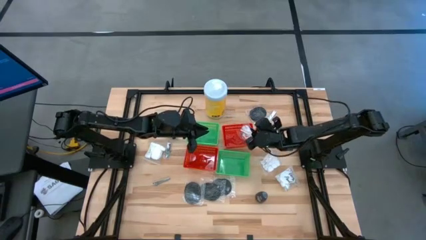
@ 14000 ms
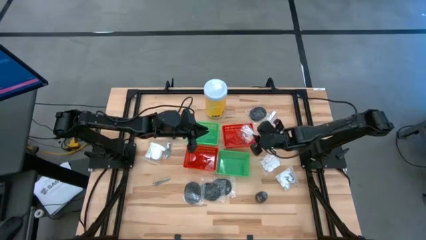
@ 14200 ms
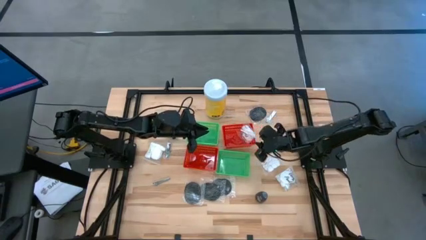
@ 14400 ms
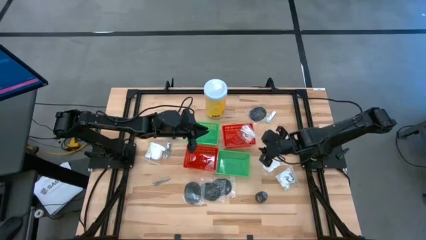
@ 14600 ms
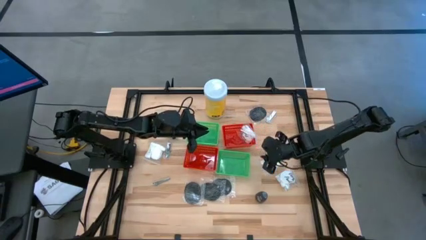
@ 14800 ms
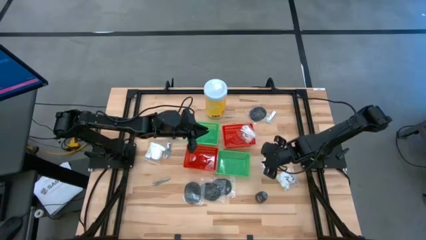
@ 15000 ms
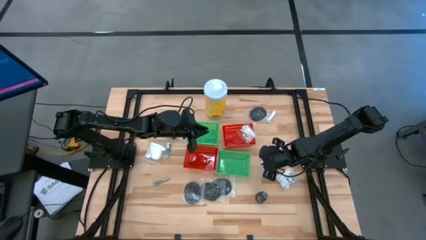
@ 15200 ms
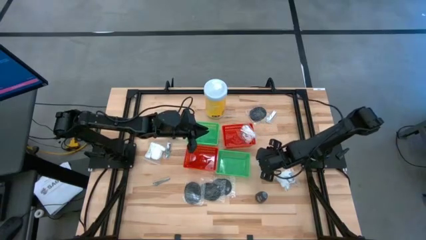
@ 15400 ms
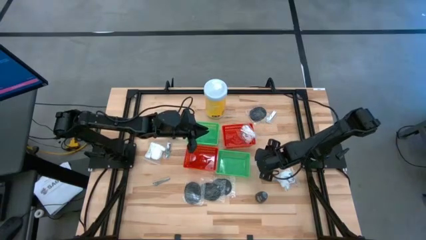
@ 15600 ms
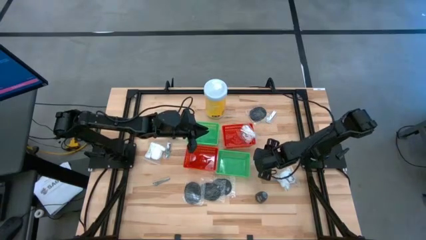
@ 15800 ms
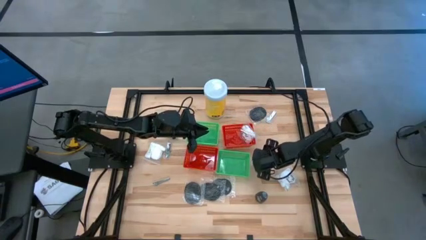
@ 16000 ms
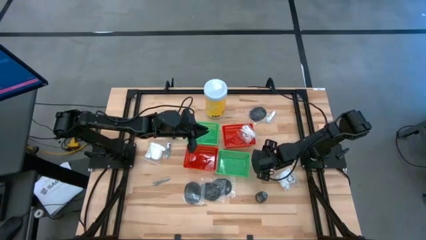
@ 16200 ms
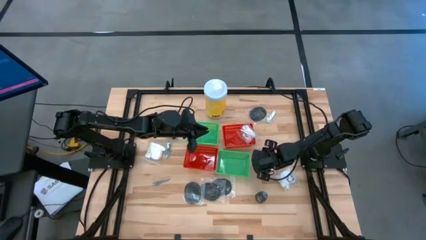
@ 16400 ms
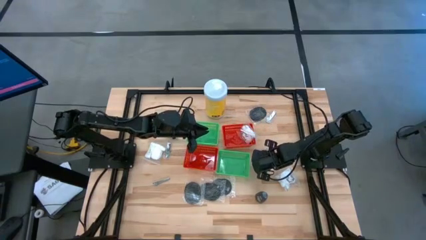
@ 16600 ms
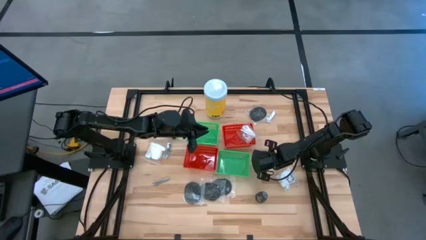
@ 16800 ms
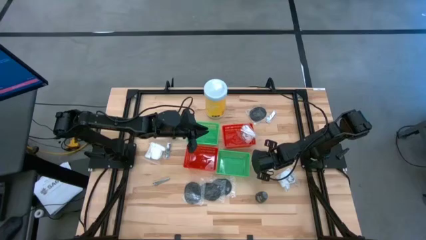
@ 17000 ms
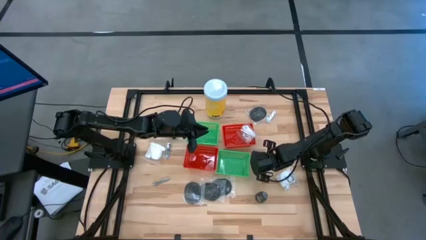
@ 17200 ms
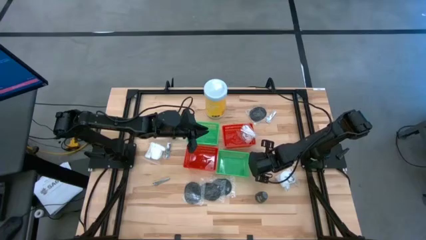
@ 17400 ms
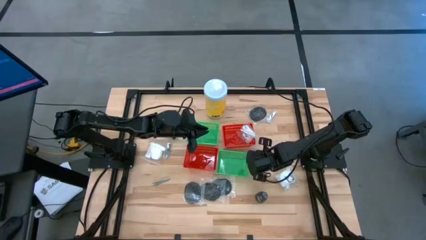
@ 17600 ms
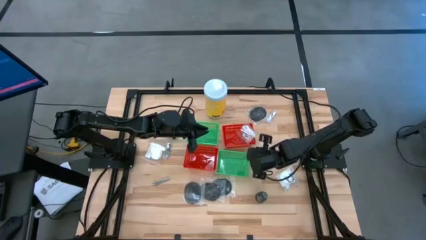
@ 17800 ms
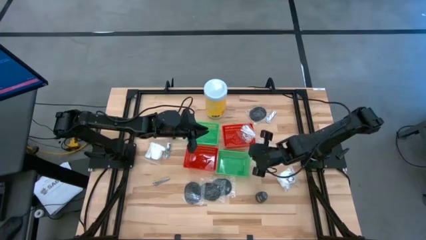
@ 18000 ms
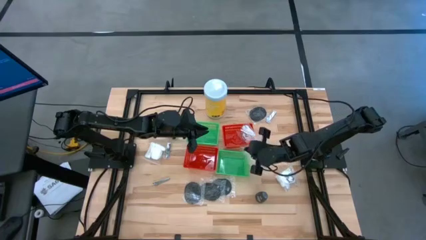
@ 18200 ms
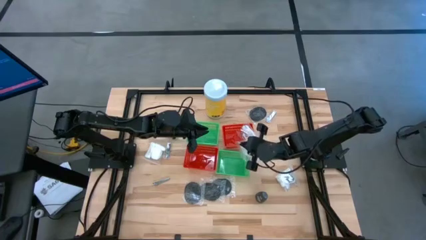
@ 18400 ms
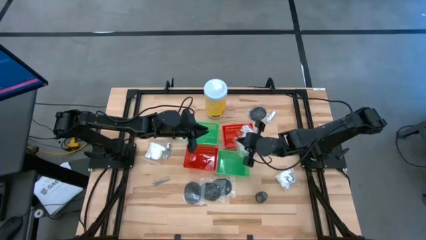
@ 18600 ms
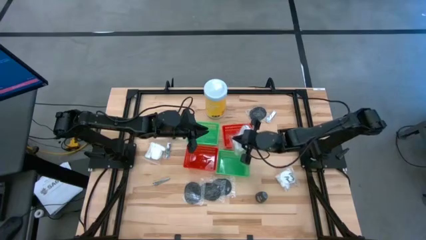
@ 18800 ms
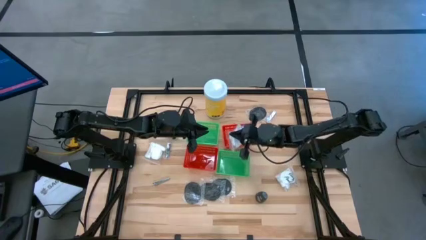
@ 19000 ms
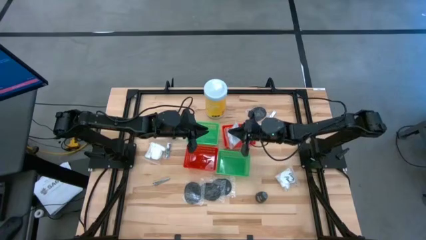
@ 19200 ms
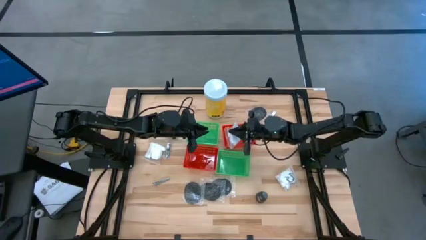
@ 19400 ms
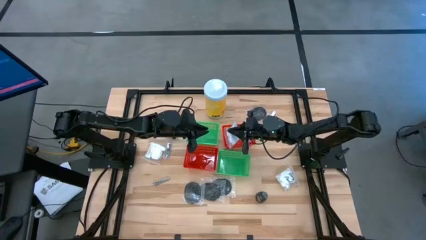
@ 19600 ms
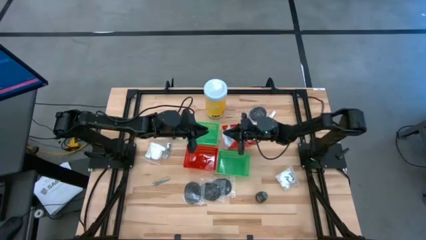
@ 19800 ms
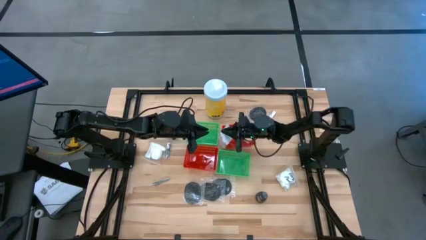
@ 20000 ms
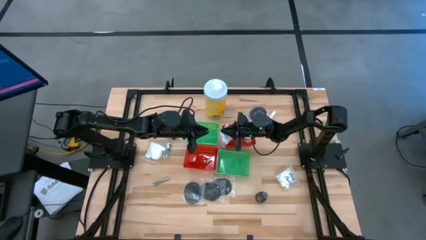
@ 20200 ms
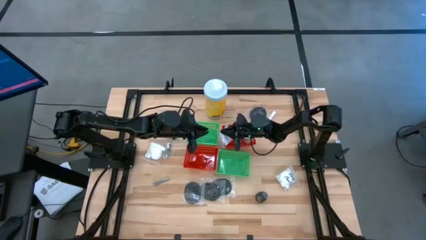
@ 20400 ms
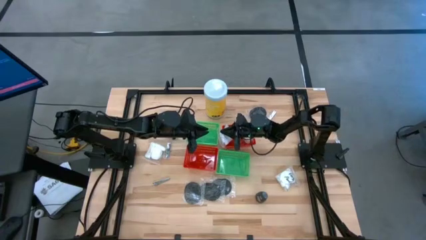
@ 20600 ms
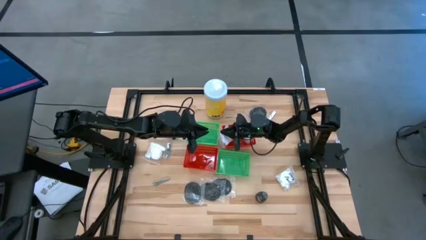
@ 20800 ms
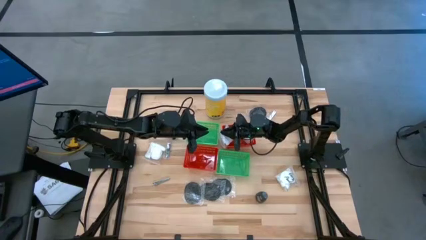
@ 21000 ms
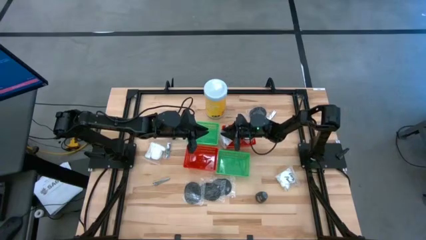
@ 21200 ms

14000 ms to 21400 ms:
Task: Pick & Place Travel size toiletries
Put the cotton pack into the right red bin

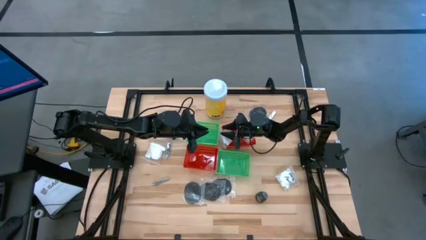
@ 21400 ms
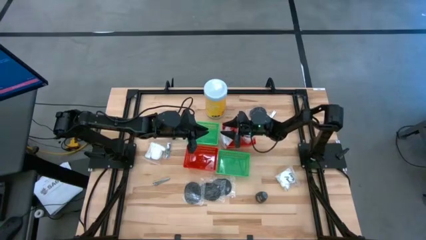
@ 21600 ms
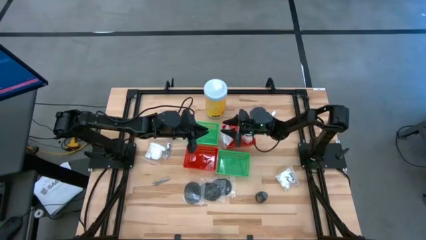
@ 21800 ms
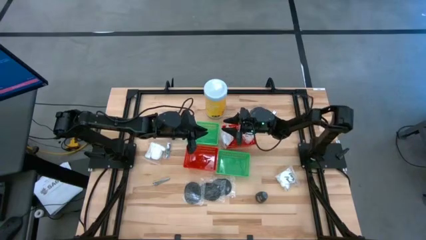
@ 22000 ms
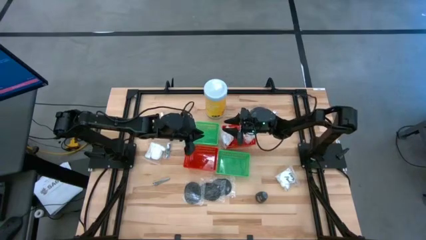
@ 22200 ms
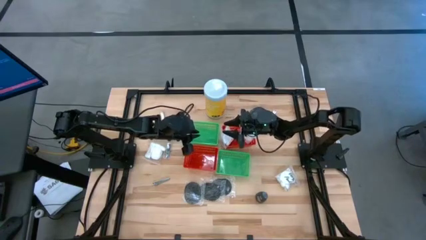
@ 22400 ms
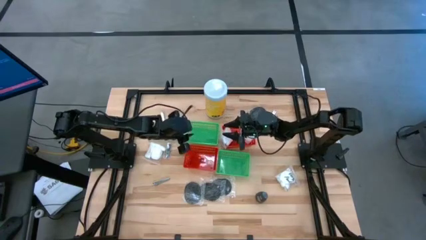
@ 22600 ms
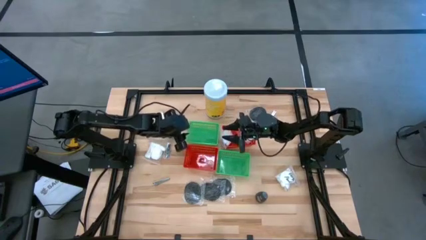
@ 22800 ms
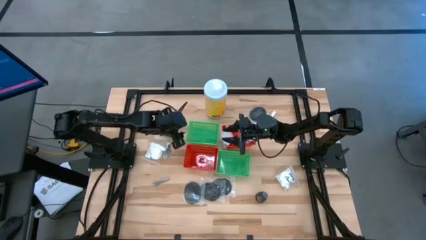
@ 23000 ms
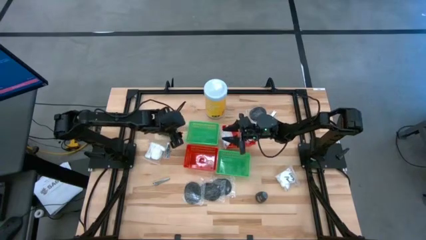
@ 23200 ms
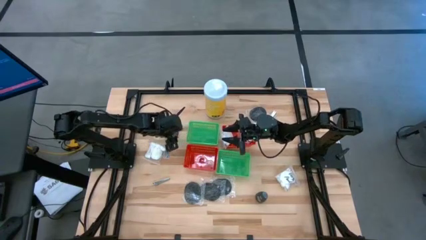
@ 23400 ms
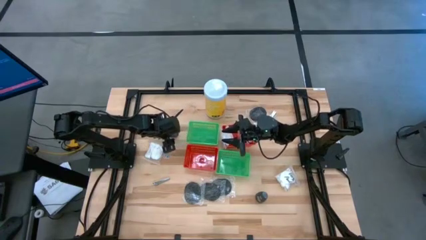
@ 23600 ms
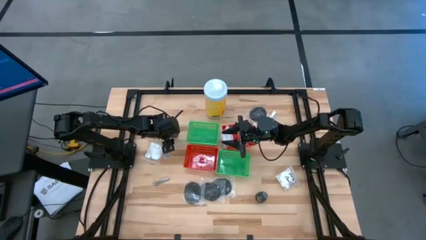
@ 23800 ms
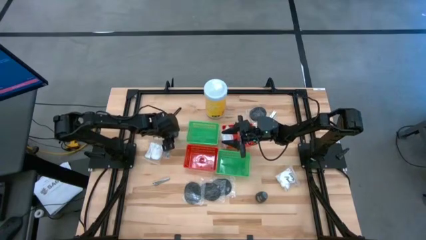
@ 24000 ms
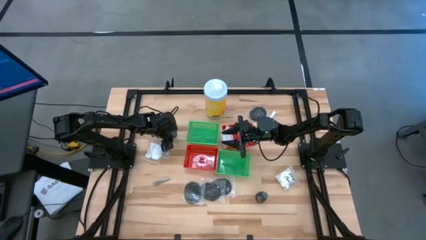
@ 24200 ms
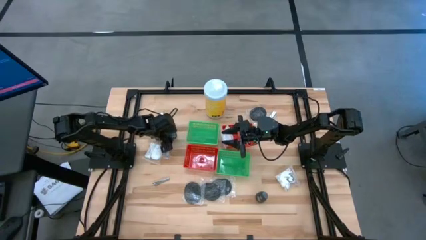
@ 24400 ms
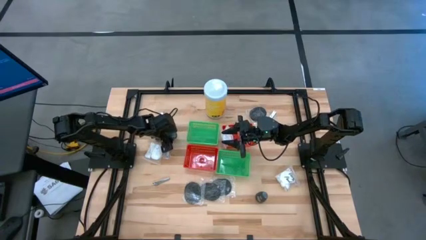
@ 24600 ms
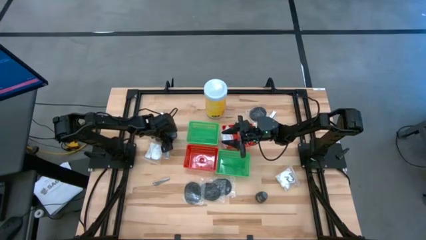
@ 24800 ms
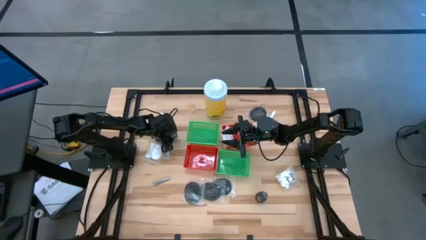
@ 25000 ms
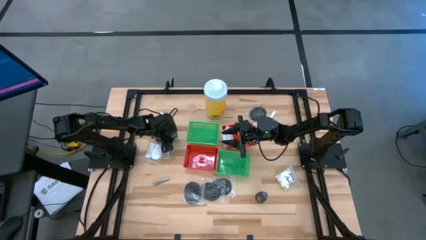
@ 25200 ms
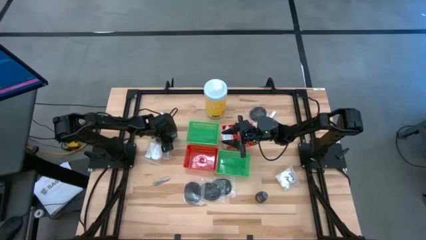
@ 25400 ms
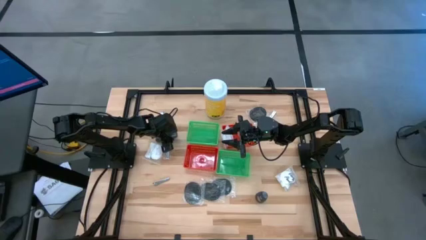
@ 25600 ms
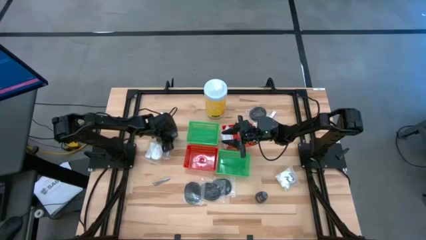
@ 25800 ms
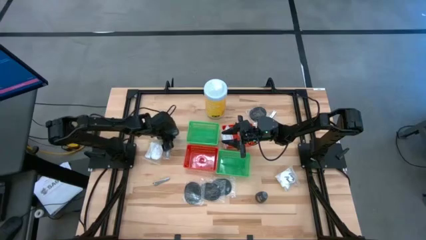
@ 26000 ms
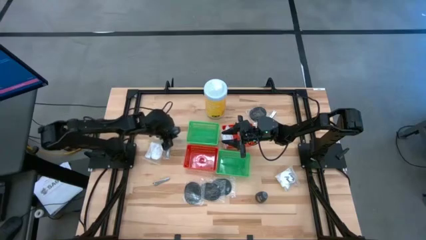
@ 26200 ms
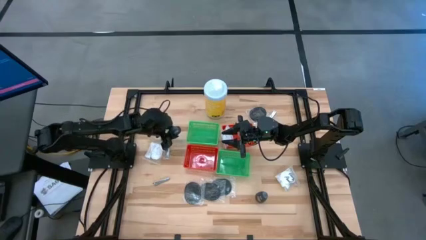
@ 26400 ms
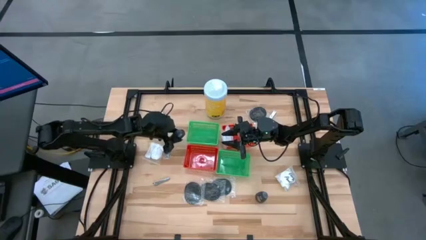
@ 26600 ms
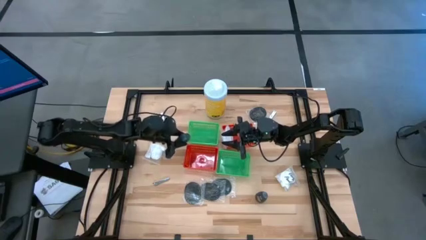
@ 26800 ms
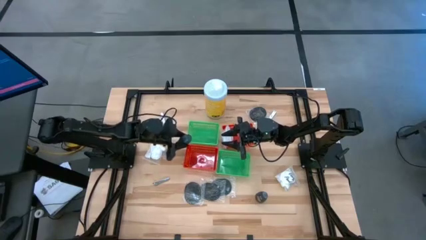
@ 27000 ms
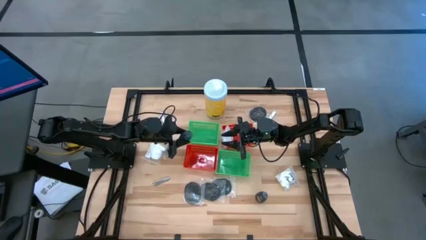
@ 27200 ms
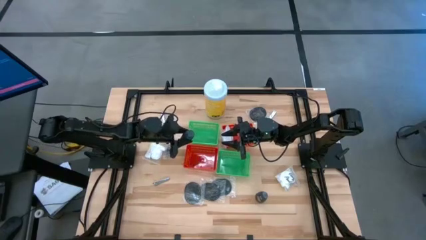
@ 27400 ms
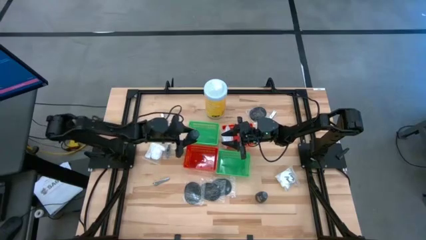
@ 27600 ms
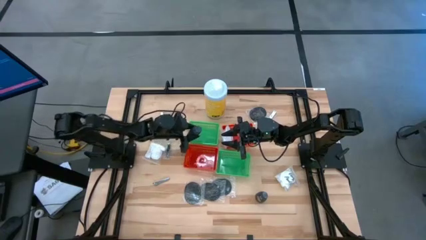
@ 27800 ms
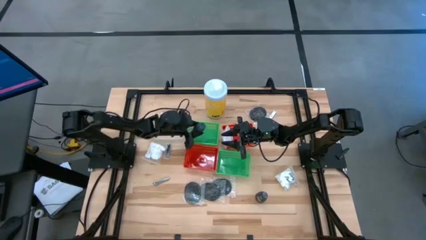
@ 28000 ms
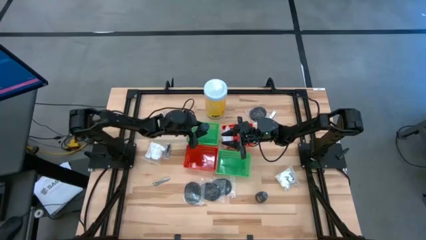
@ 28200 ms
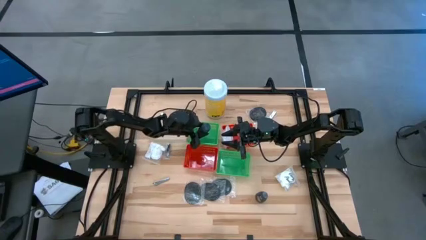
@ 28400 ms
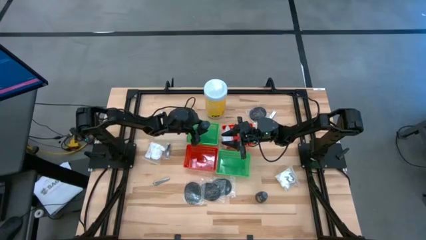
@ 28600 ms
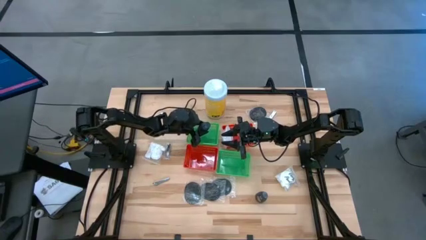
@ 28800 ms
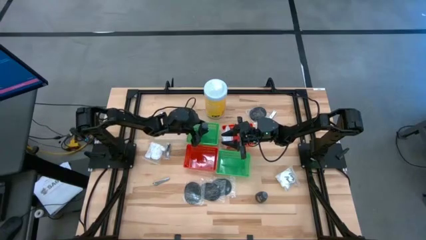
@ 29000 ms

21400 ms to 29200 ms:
Put the deodorant into the left green bin

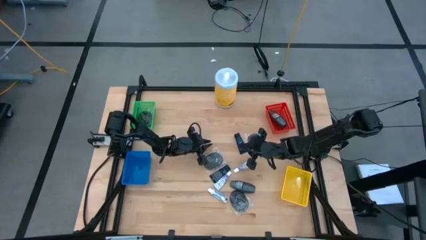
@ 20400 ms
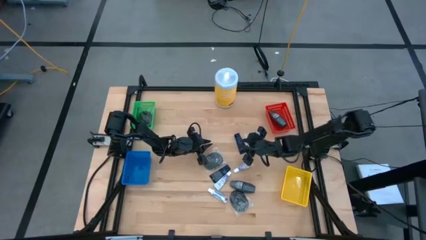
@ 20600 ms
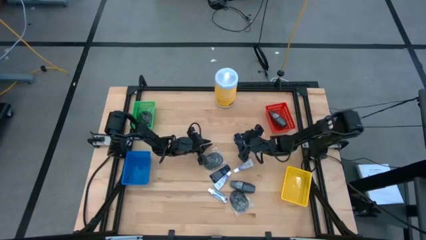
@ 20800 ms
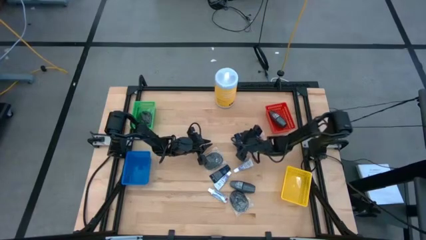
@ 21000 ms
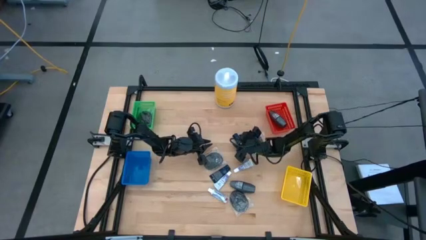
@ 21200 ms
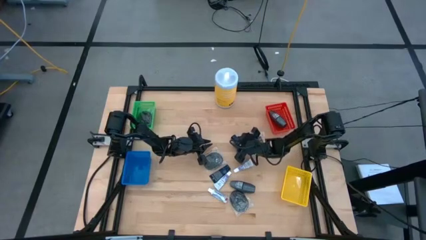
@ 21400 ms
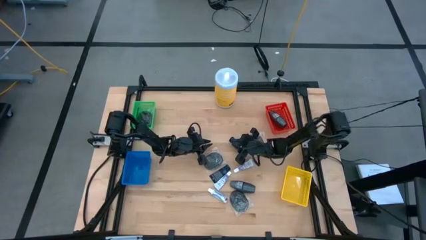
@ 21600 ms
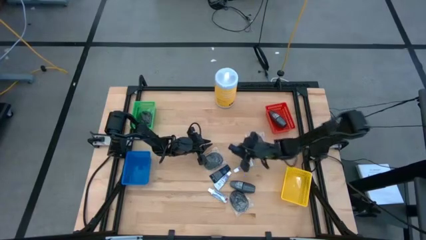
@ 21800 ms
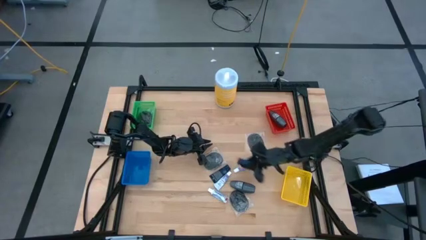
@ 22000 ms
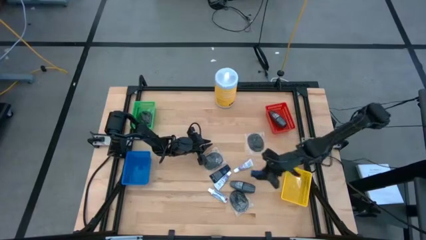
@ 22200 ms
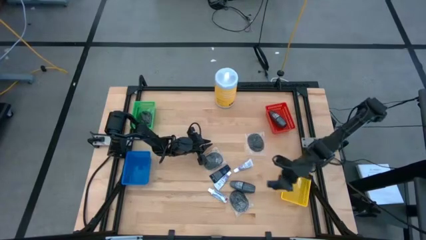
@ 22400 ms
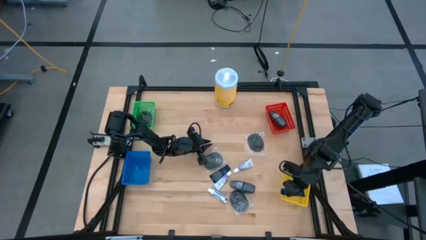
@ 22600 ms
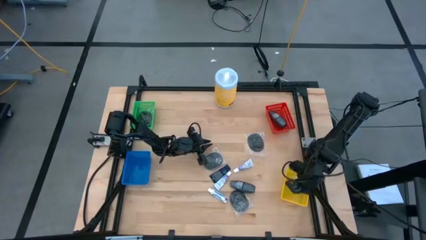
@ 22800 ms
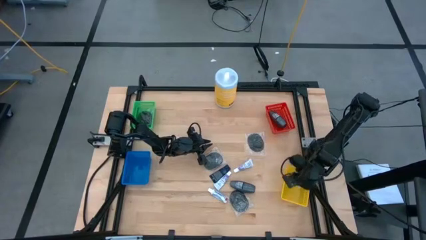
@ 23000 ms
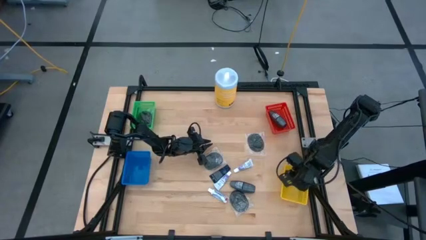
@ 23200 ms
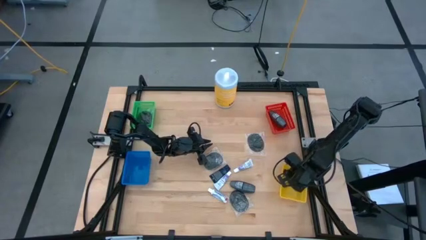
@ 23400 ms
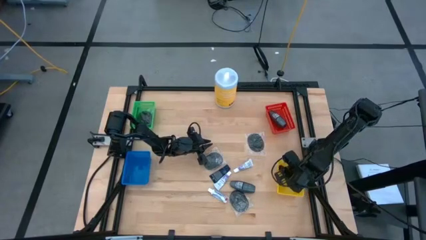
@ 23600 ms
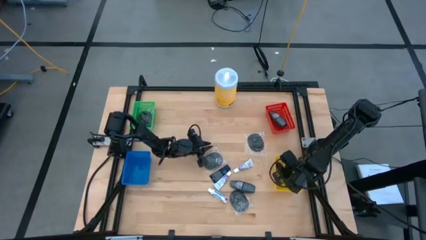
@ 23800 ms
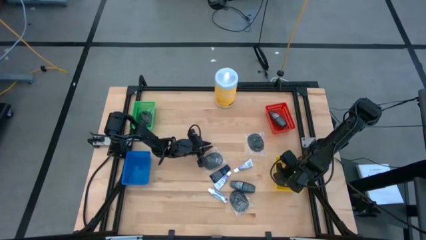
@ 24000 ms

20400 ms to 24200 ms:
Task: Pick & Place Travel size toiletries
Put the shaving cream into the yellow bin
